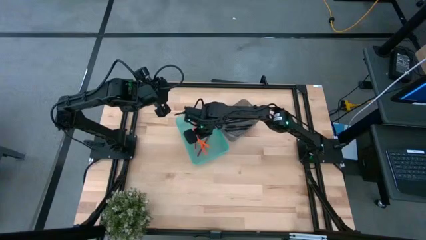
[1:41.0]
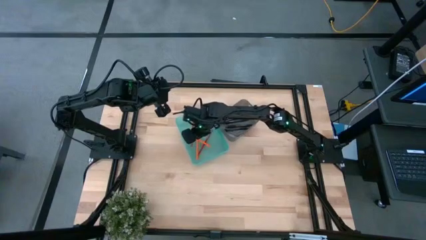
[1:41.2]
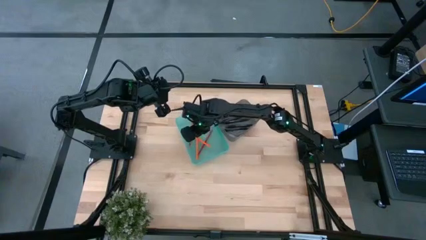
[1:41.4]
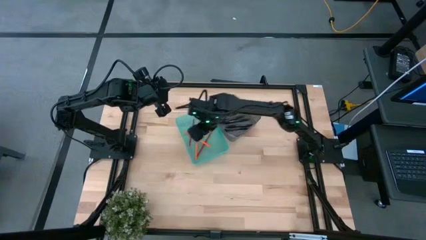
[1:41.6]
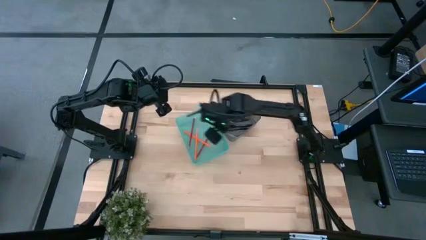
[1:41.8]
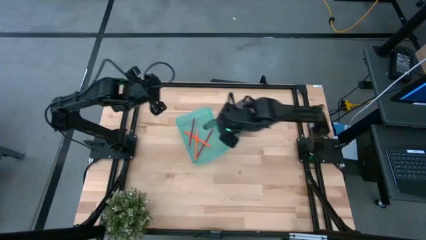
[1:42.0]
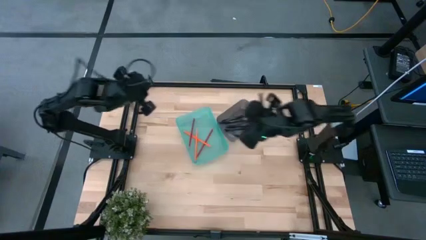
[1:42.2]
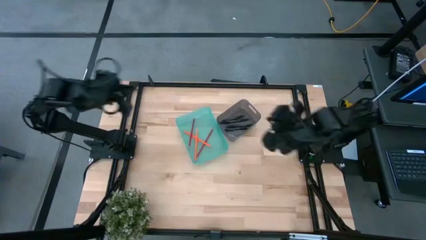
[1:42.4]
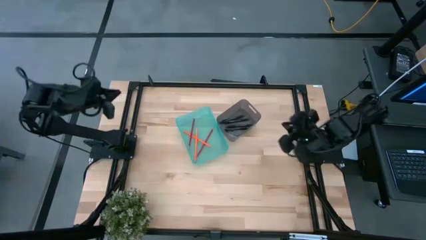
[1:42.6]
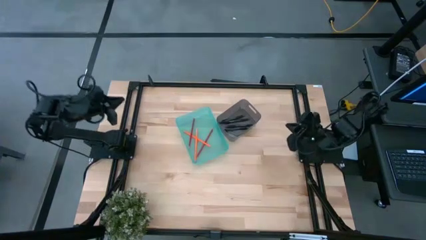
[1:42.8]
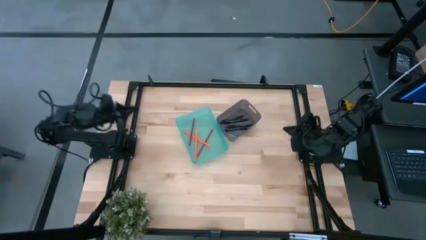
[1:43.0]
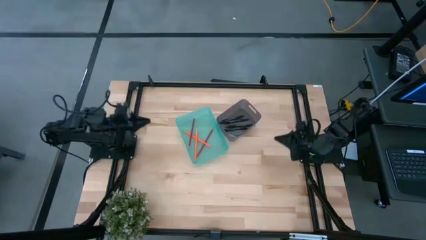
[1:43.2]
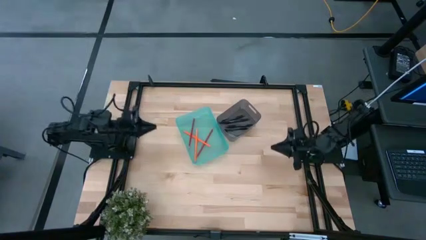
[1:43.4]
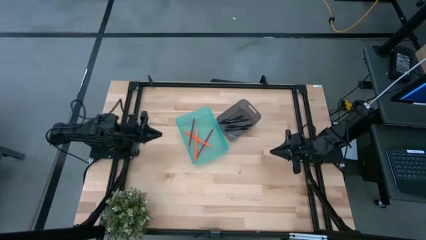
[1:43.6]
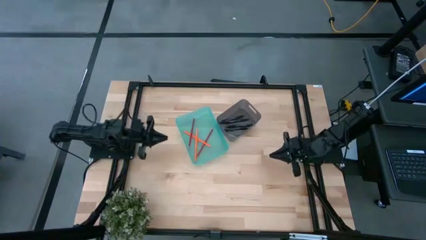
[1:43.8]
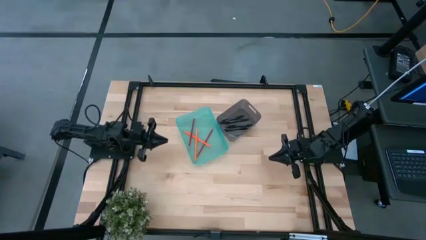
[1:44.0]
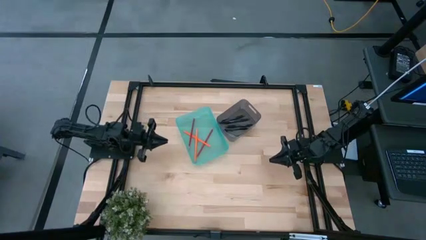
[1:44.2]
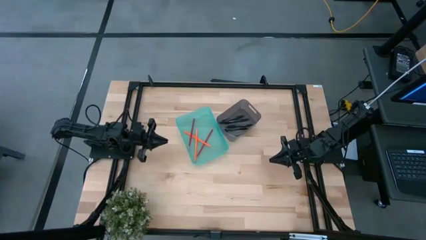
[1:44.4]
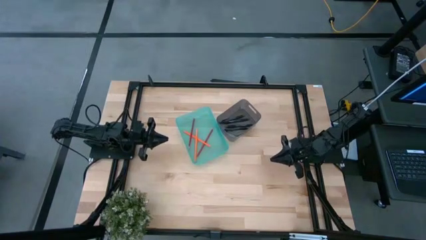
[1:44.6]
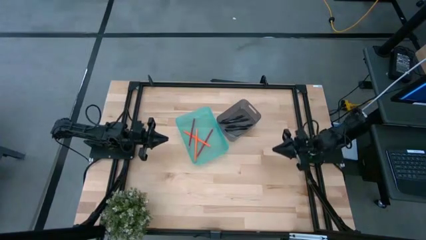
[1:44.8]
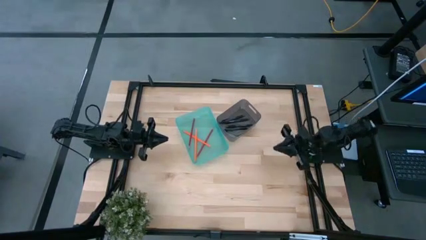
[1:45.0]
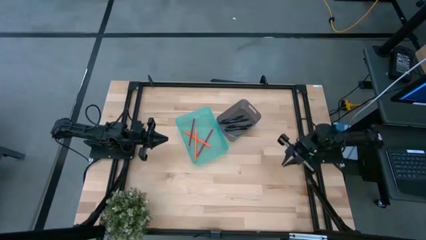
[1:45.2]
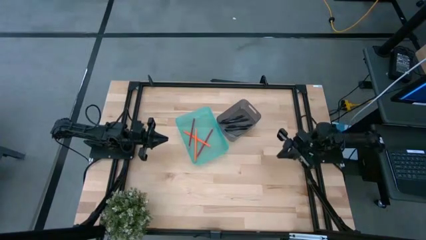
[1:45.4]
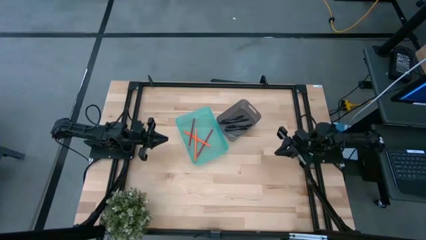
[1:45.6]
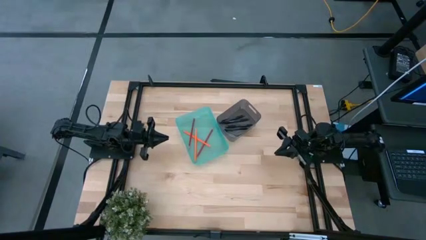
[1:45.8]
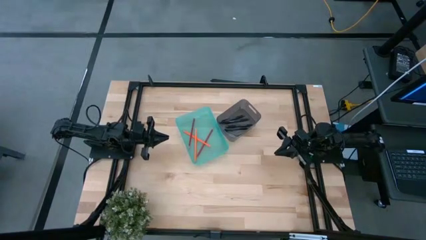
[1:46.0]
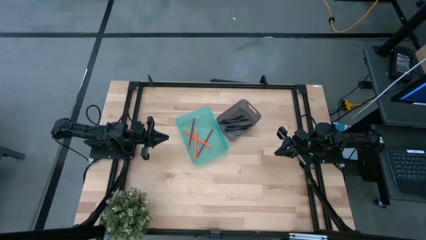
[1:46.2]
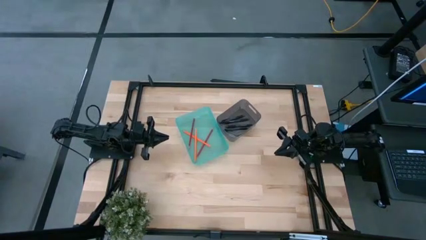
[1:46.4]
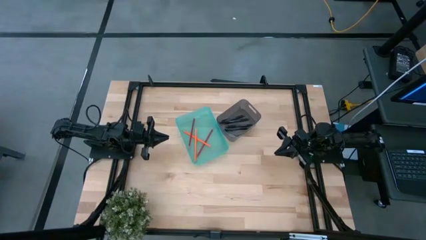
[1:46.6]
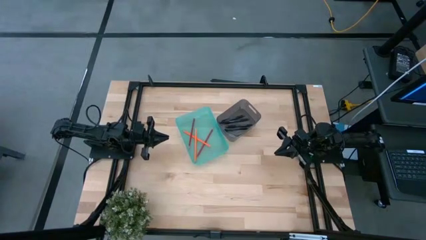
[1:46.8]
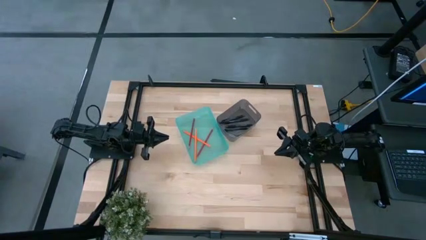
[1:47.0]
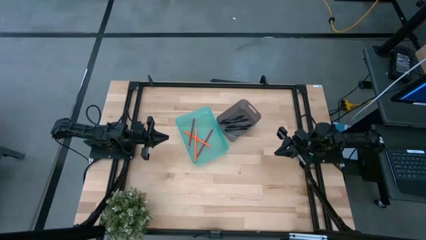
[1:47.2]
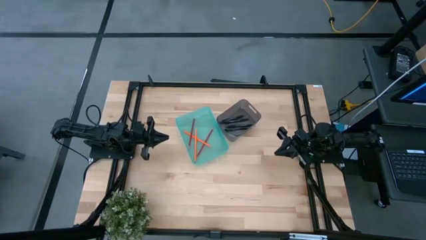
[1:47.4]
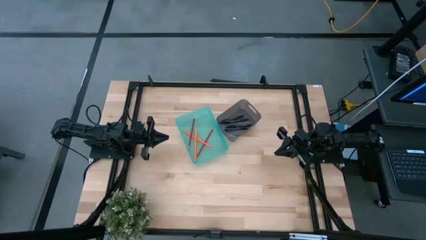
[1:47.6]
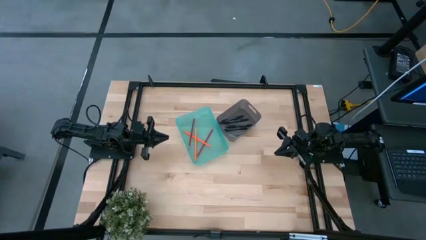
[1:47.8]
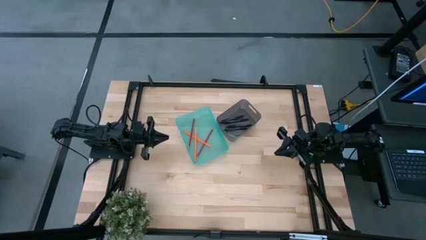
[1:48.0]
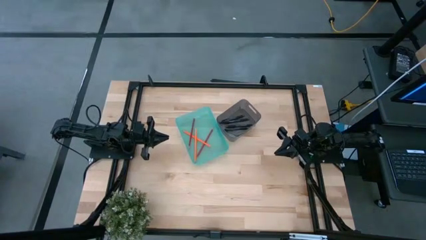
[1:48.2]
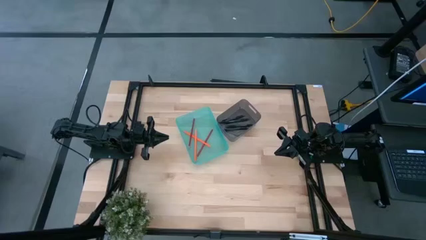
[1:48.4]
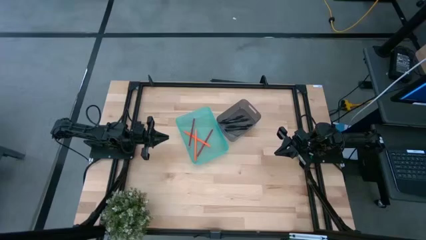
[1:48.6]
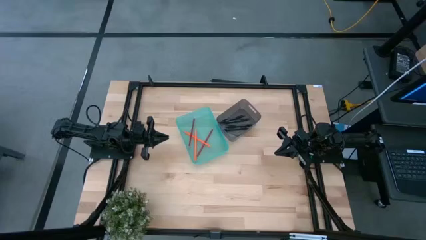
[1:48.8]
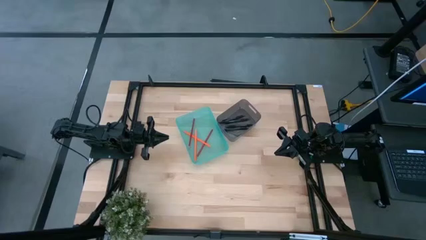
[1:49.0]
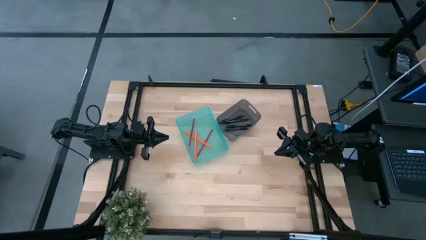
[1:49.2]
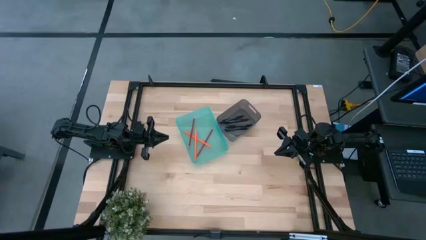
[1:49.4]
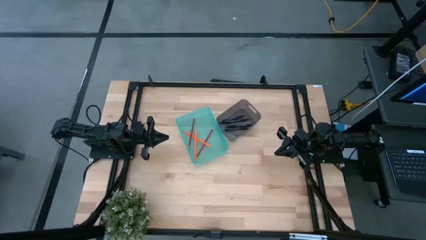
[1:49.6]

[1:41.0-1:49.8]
Task: Sort pens & pencils
Return to Home Position

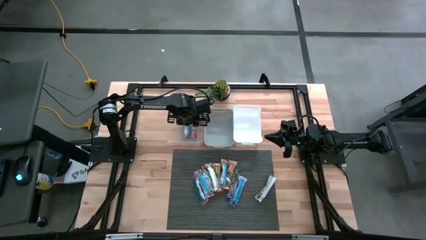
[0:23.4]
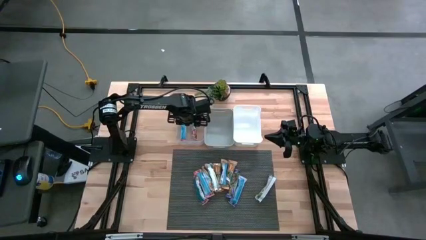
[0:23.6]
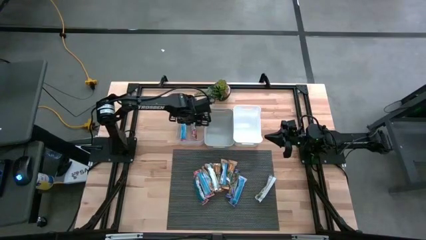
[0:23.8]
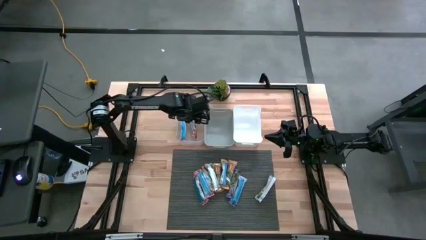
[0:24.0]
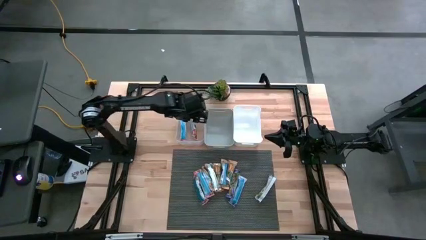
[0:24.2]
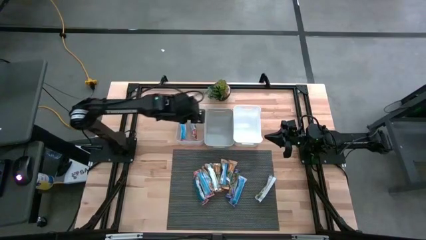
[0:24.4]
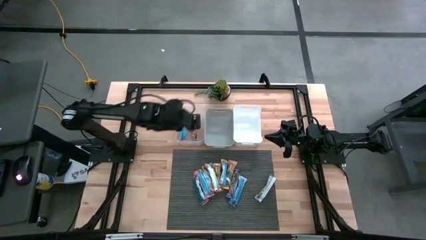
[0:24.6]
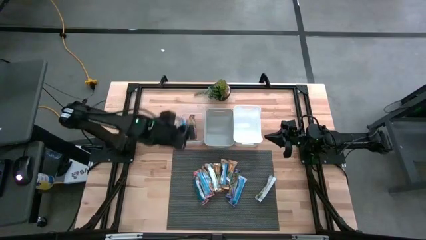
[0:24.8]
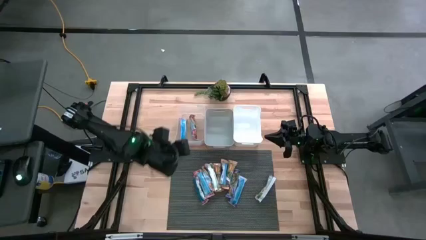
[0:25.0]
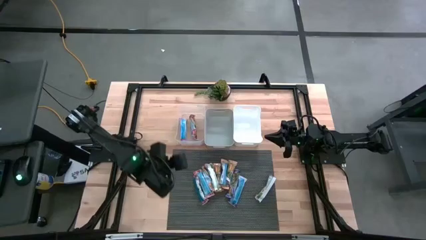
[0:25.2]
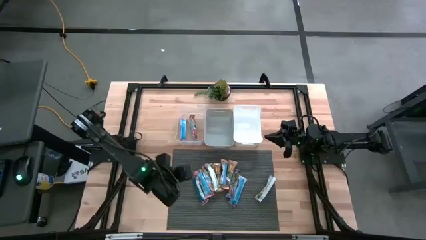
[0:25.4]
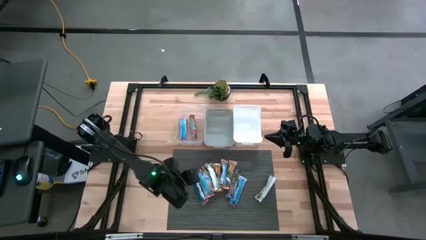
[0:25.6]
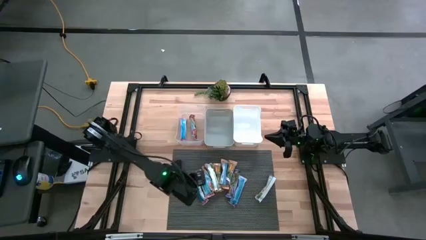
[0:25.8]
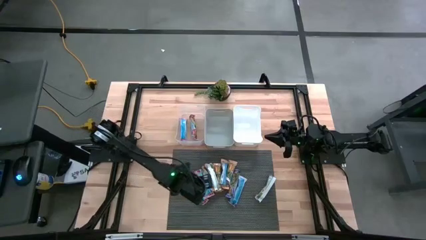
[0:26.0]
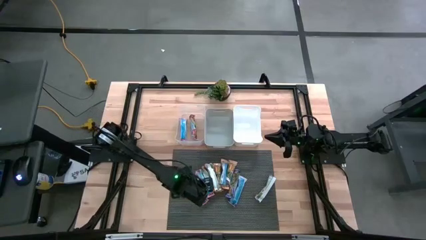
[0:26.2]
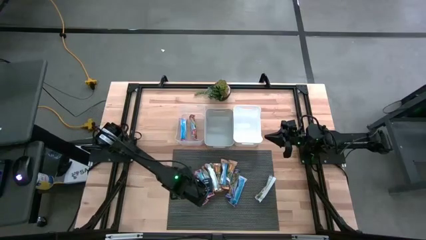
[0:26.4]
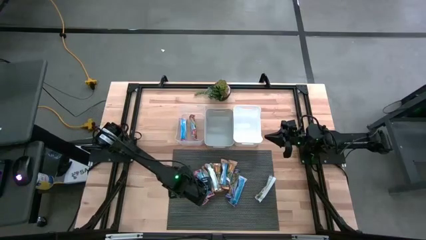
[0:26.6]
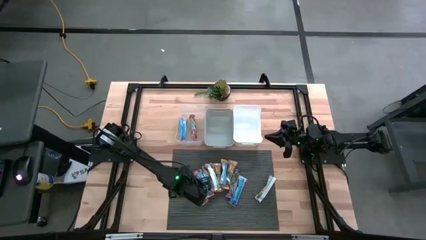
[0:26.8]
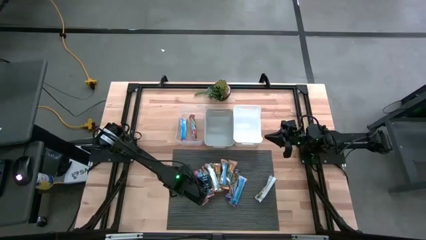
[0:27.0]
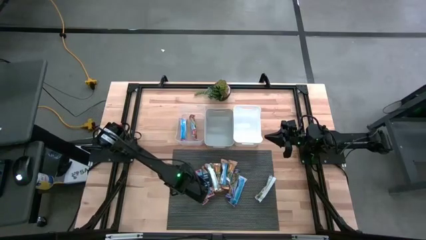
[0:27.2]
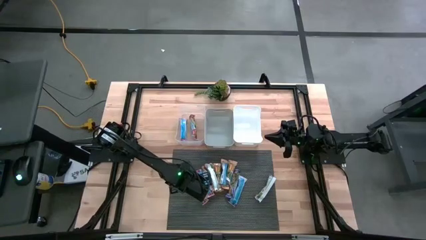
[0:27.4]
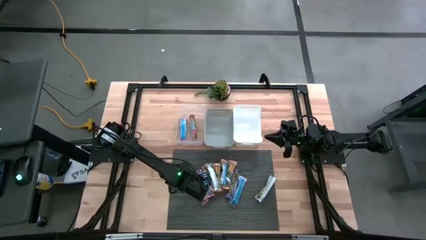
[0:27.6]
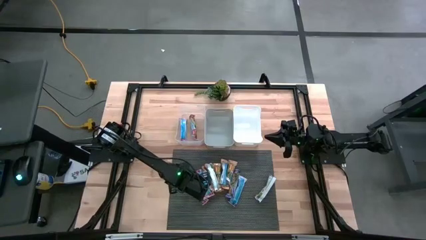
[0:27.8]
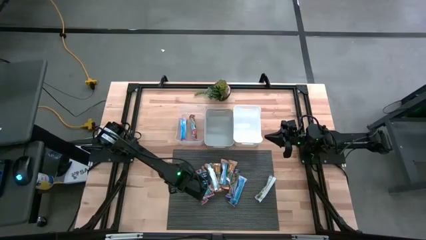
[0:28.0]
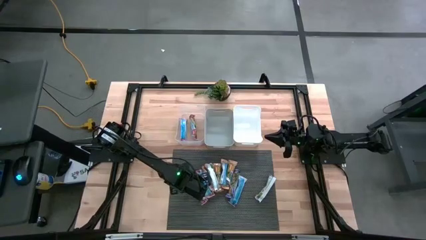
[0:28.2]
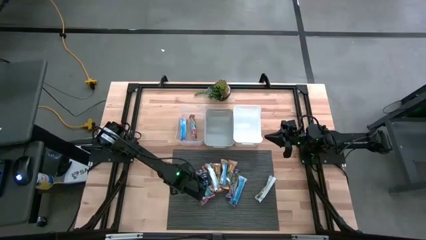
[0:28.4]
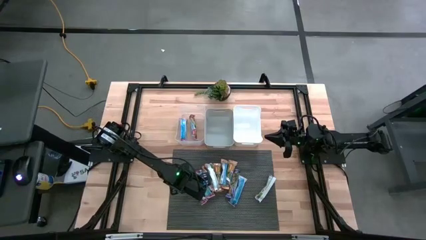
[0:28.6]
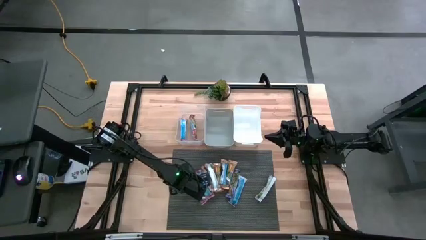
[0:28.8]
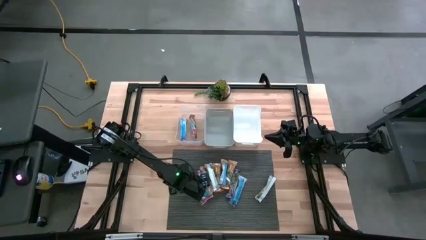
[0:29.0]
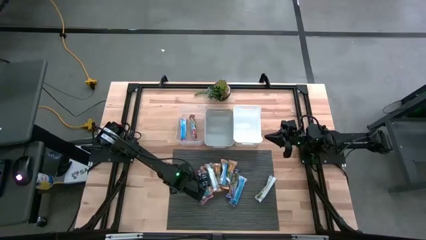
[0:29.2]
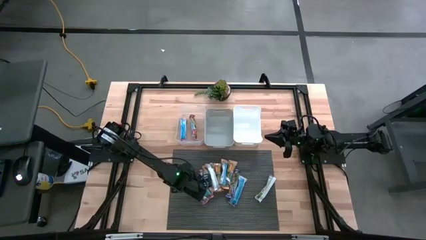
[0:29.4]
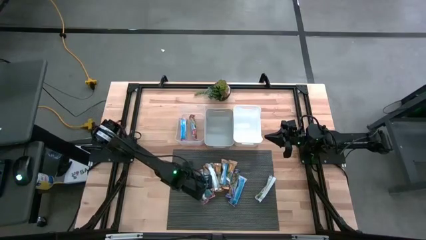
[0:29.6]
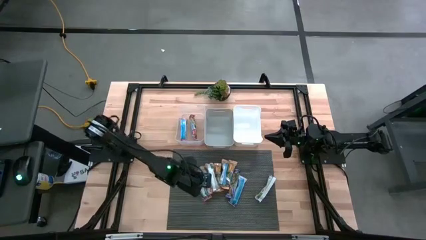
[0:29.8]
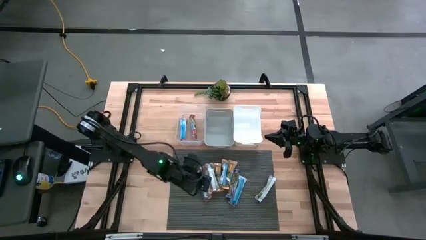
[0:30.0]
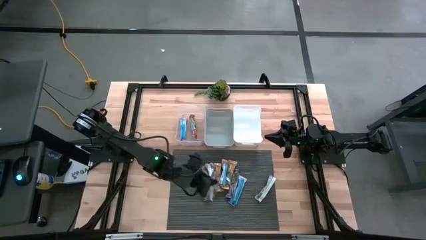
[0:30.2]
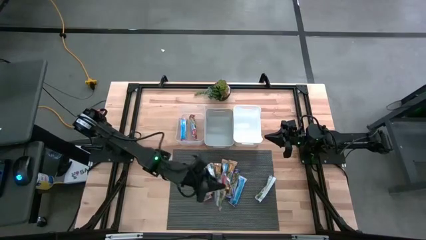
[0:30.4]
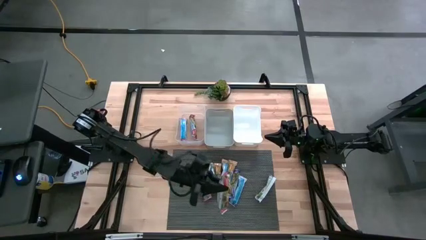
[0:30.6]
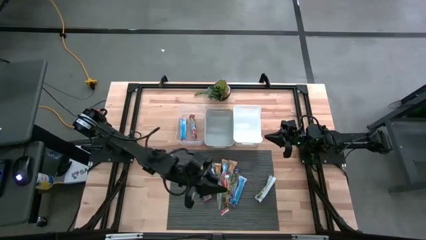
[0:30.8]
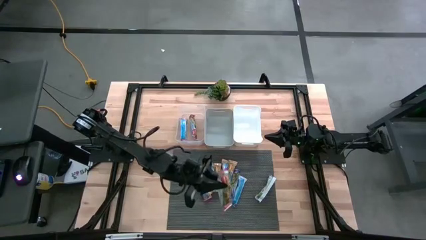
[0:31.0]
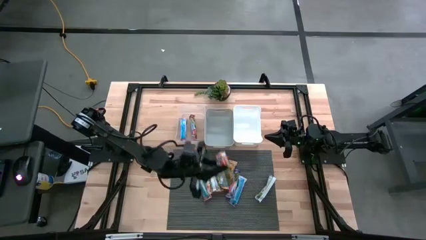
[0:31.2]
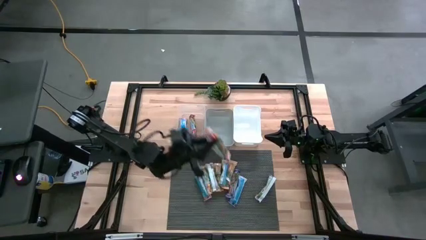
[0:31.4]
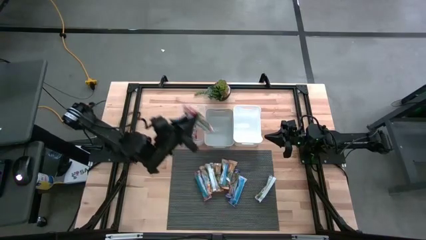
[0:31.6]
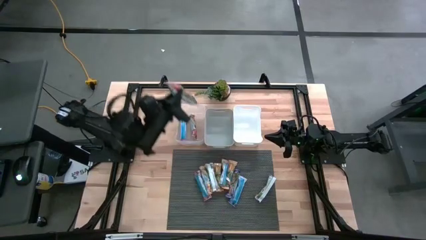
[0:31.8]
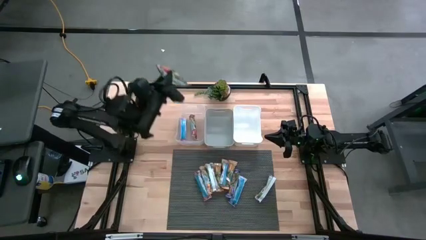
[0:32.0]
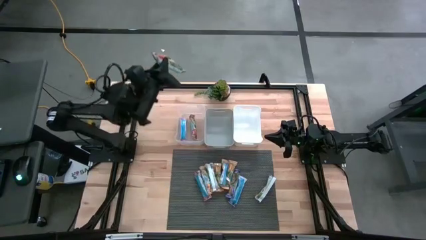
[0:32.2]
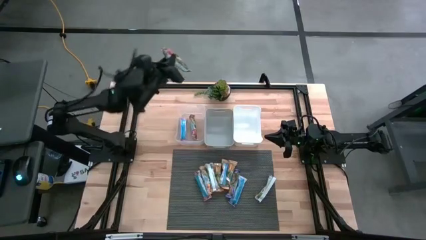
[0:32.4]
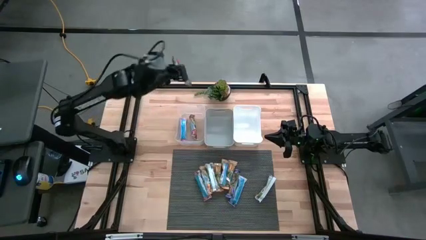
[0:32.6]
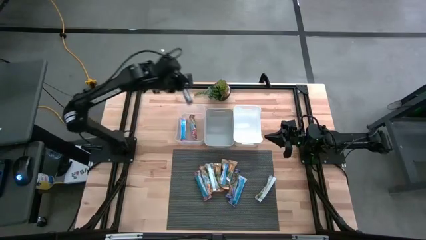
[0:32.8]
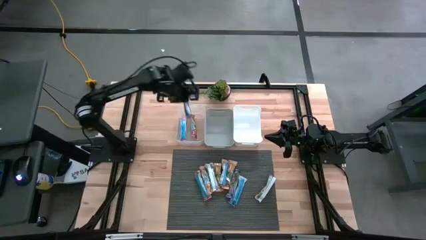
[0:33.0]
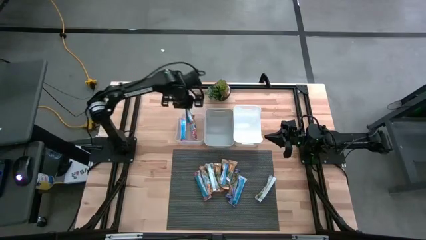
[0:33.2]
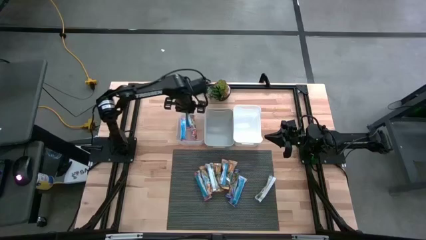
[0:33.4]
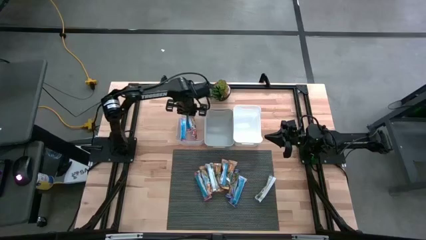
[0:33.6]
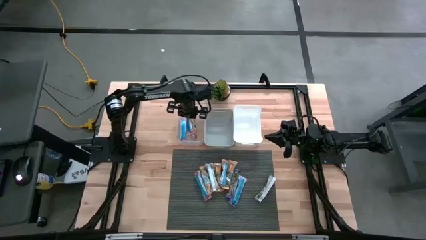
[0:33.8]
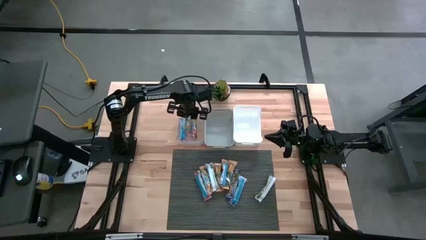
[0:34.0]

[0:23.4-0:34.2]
Task: Pick and place Granola Bars by type
Put the red granola bar into the transparent bin
